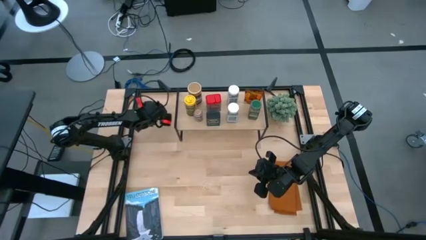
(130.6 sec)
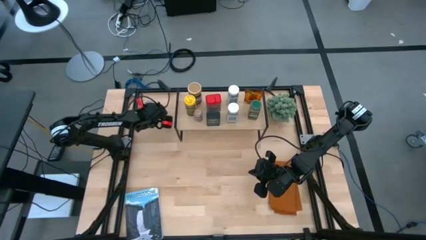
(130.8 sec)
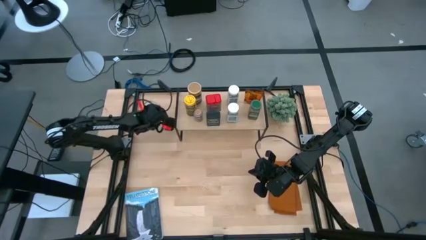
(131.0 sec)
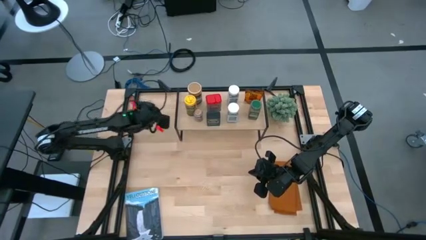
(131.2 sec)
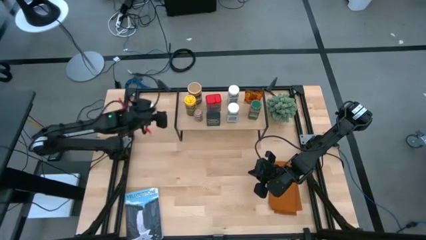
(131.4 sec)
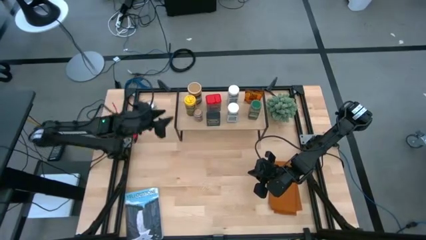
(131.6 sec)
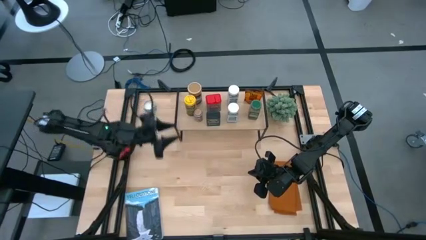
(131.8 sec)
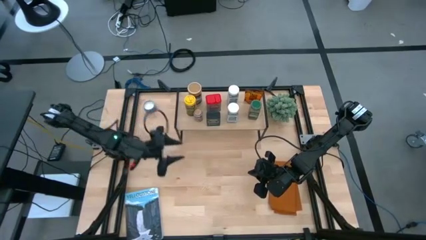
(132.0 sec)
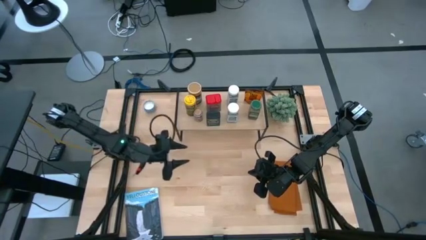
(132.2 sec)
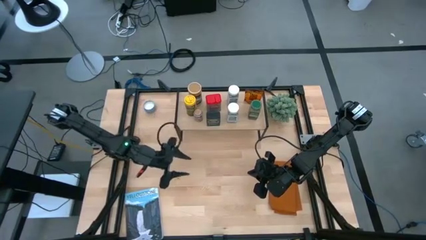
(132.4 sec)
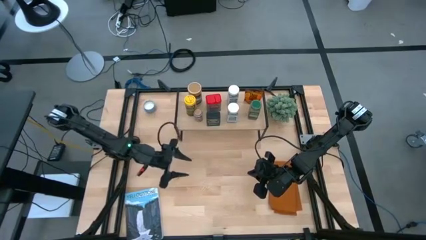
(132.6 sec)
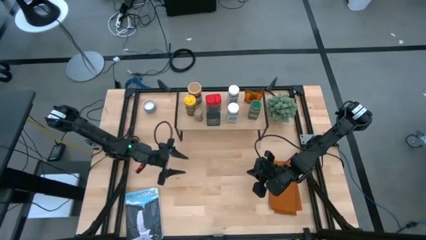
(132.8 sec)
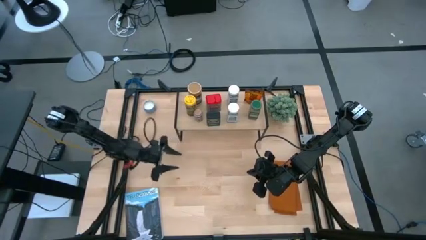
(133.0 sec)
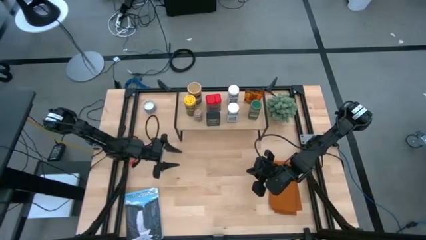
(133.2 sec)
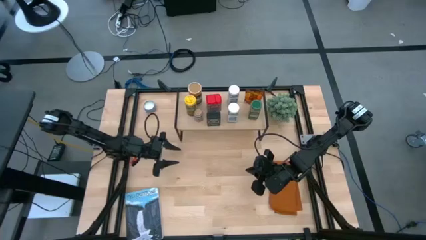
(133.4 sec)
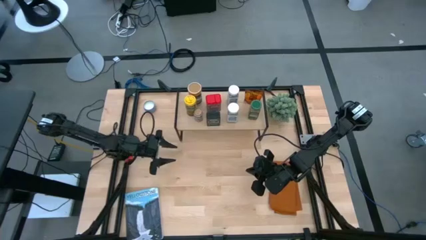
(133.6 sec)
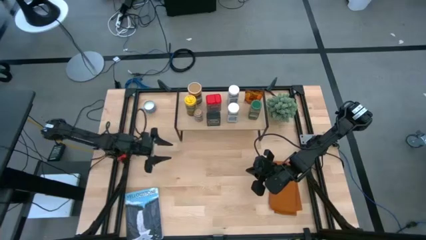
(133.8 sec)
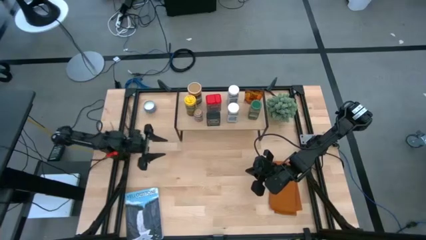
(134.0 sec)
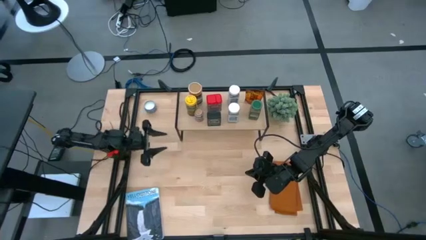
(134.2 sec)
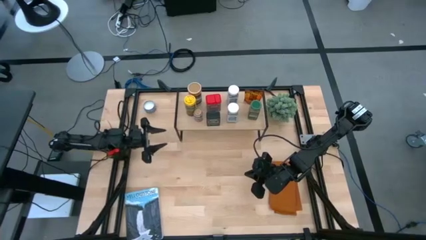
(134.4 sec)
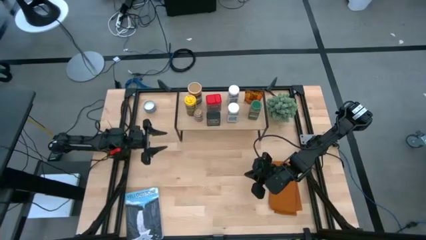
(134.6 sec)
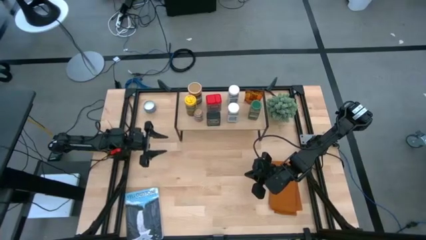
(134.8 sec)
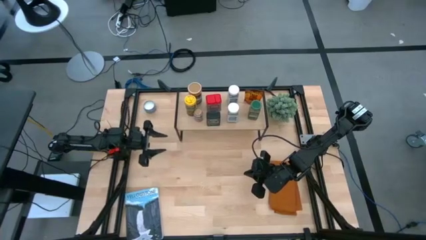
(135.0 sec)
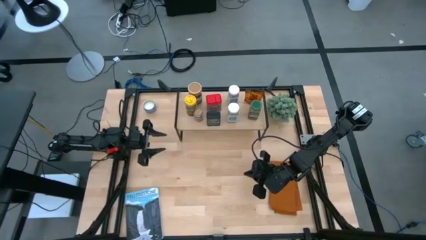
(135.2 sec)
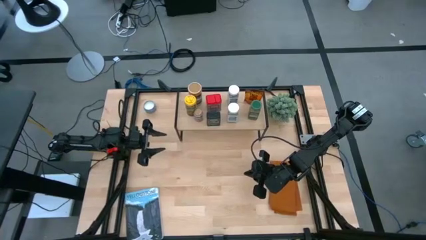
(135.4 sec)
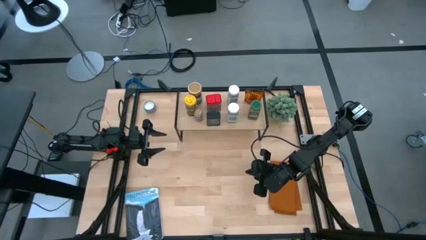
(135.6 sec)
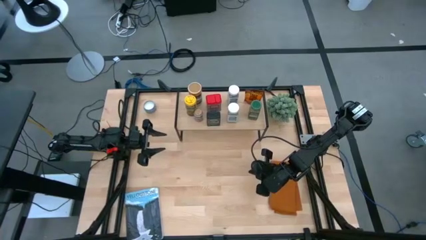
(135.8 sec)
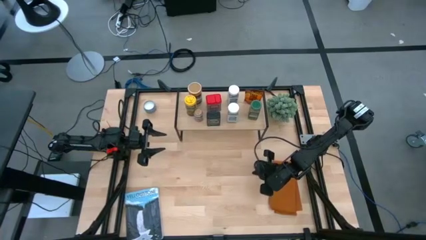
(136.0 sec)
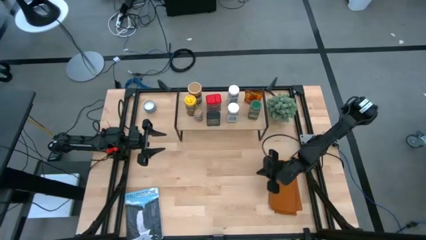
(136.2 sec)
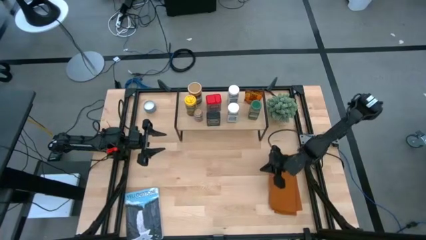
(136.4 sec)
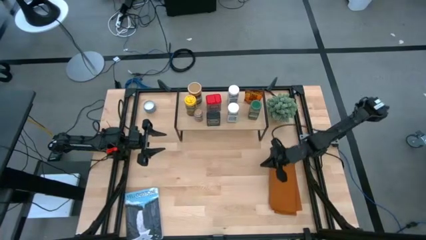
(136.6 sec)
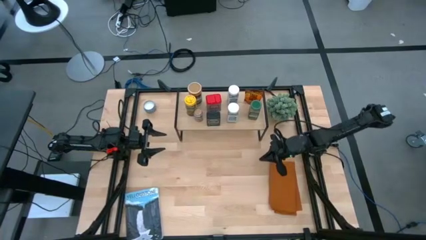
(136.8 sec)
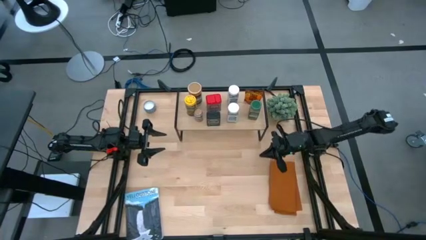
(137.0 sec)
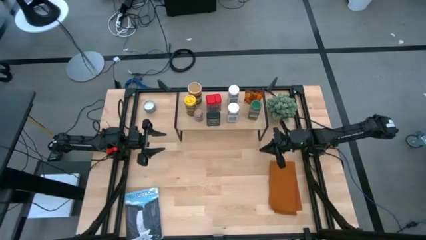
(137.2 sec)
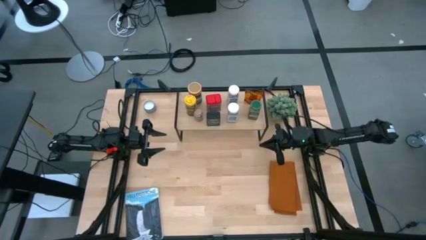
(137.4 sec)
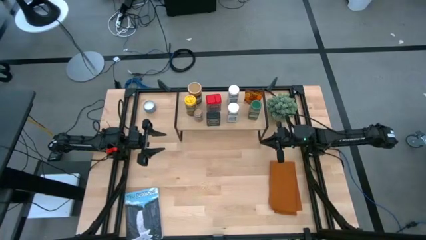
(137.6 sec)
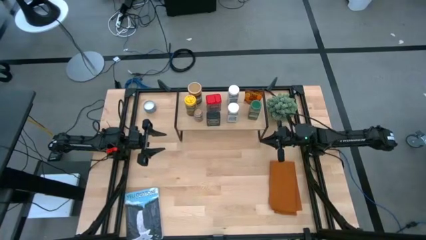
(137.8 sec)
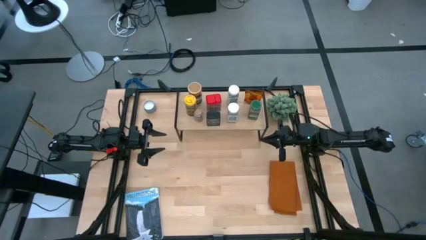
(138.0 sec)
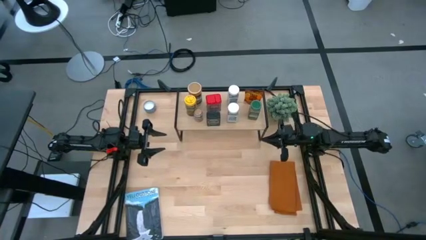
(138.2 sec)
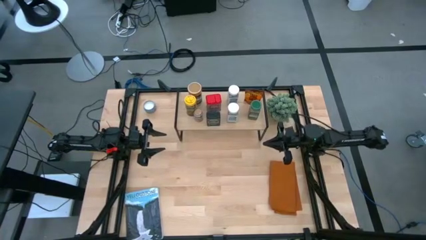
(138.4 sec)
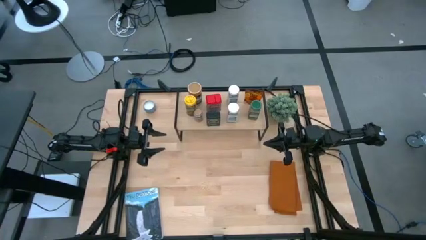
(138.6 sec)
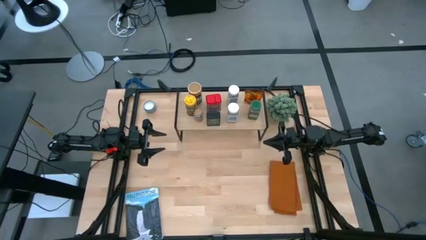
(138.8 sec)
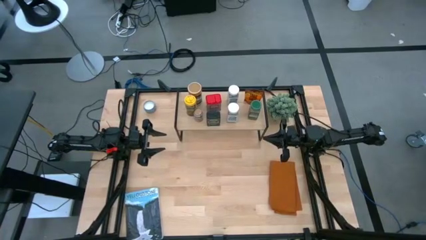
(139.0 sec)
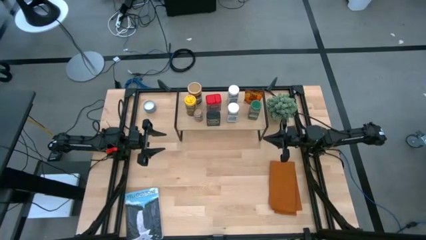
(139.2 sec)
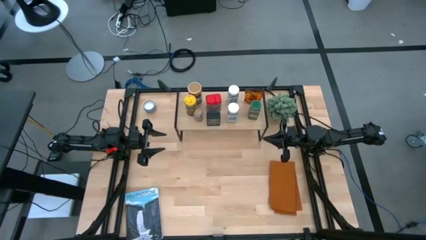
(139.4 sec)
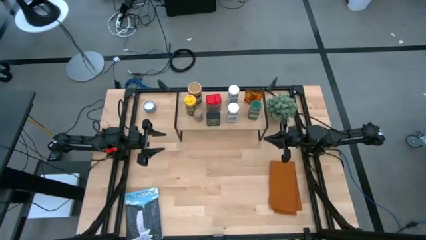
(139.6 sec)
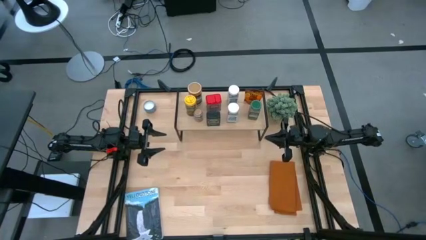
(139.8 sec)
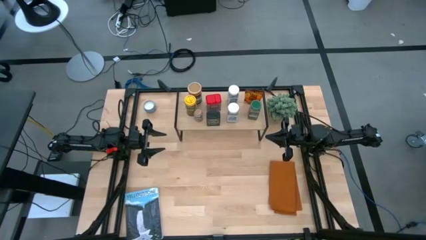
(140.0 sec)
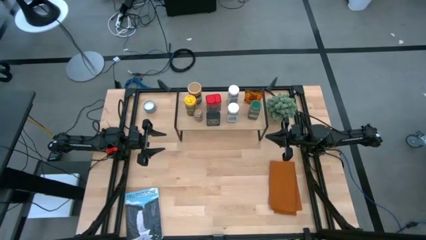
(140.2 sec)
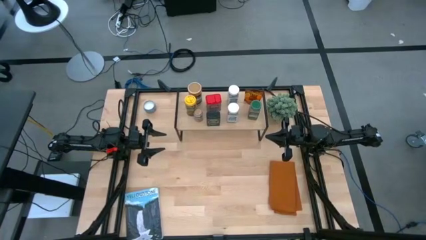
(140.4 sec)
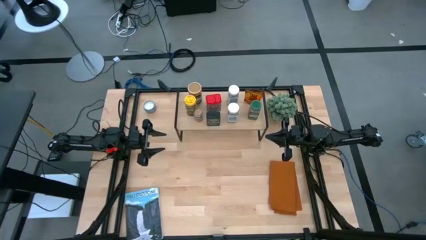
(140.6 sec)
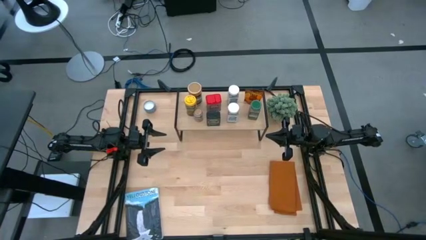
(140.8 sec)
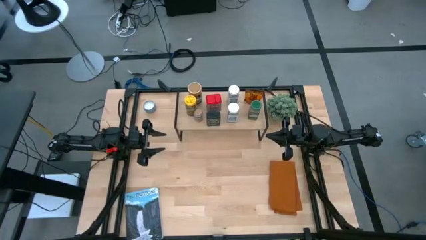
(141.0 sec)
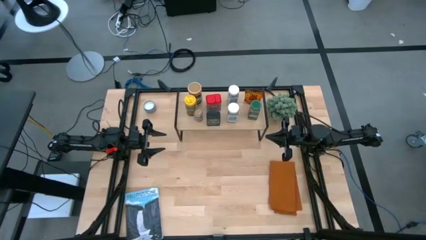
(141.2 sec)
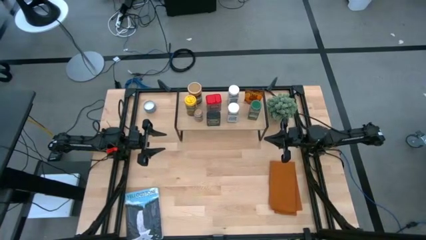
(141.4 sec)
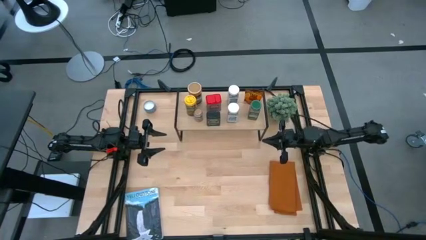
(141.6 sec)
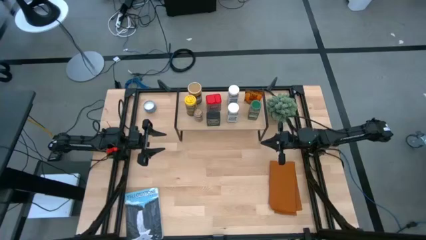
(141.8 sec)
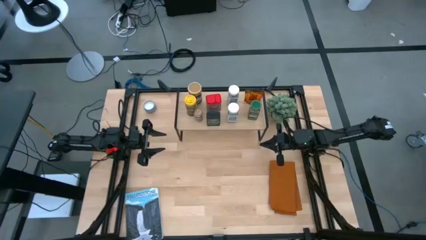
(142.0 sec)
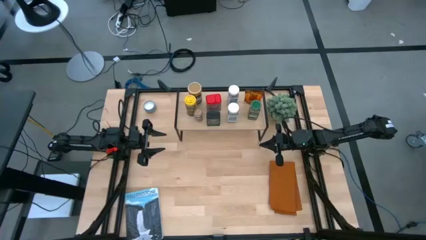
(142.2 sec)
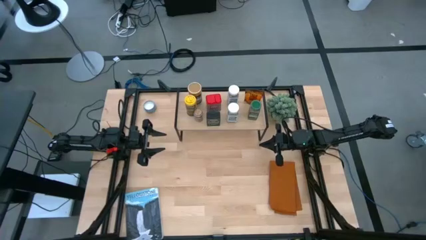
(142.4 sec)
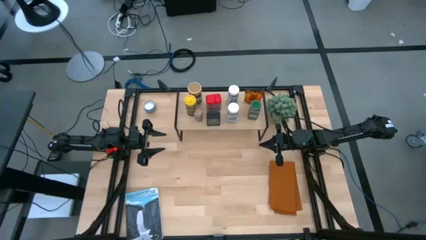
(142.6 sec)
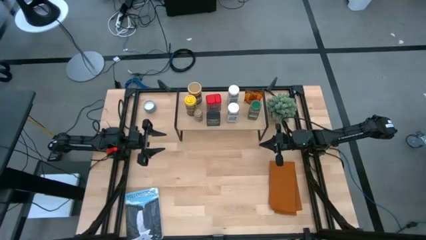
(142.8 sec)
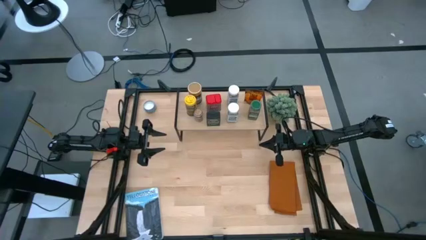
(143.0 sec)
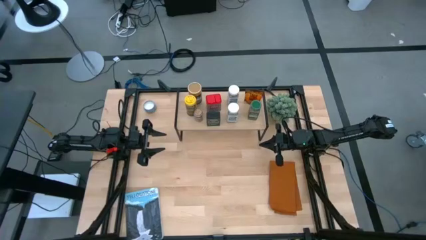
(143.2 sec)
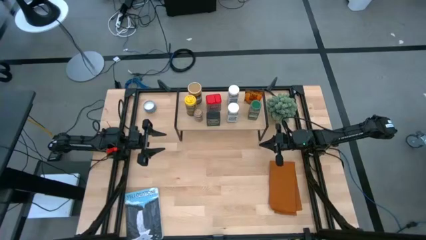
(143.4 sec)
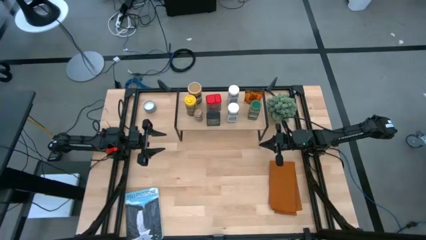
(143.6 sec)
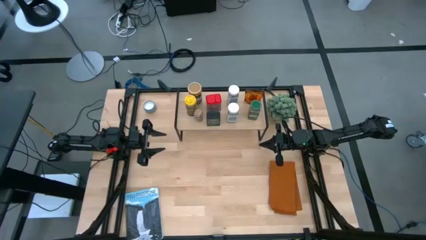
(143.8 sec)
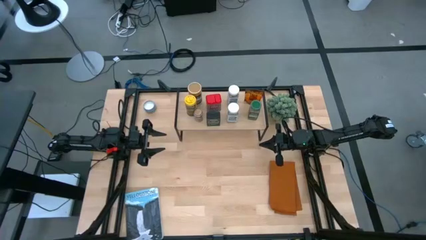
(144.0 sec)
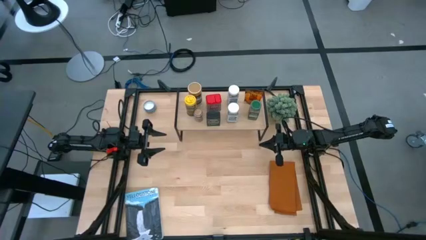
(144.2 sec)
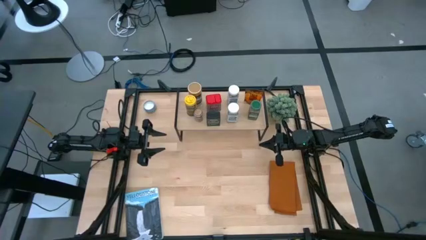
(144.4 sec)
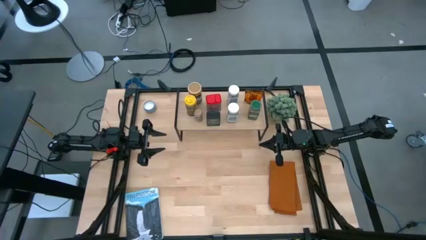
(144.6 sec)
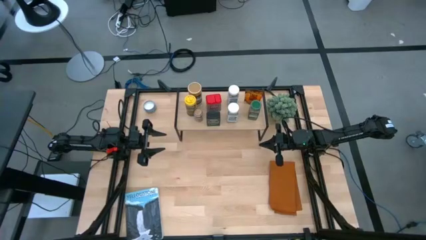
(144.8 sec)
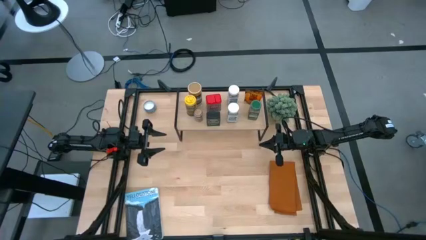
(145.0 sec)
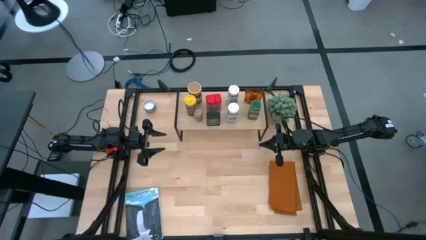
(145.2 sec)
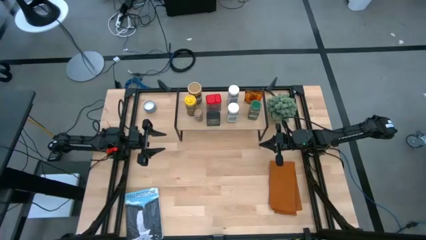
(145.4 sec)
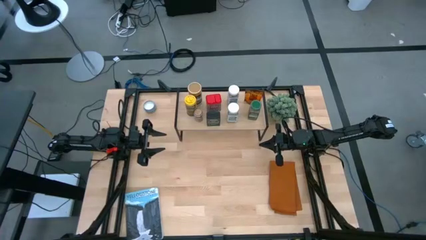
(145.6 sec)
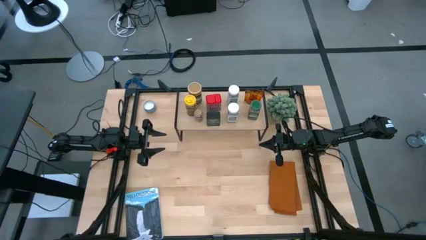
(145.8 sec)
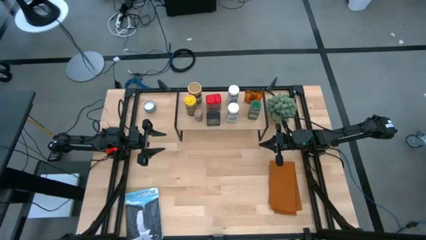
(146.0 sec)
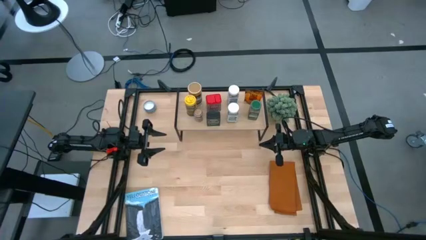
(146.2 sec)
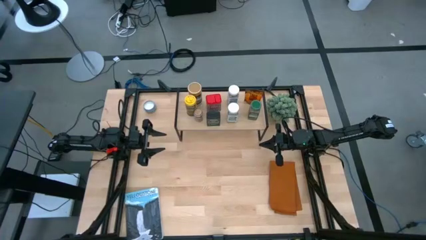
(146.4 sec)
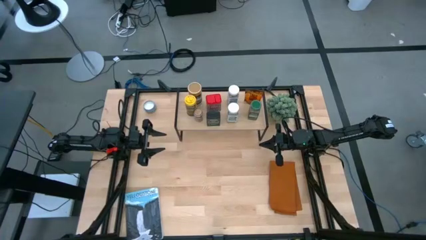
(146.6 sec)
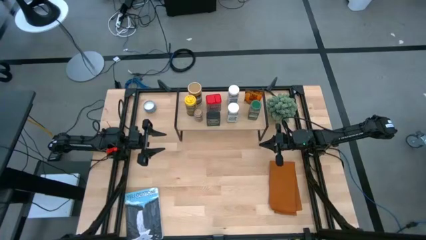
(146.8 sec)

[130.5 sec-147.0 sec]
Task: Shelf spices
Return to Home Position
